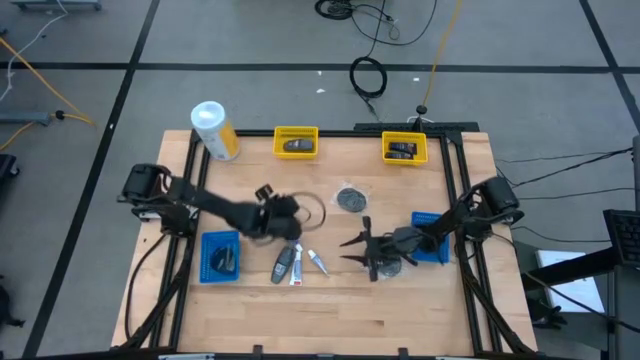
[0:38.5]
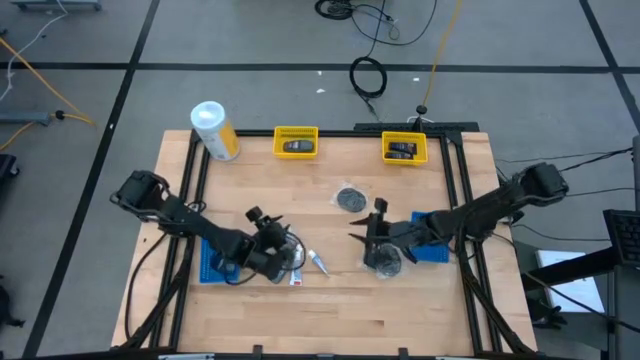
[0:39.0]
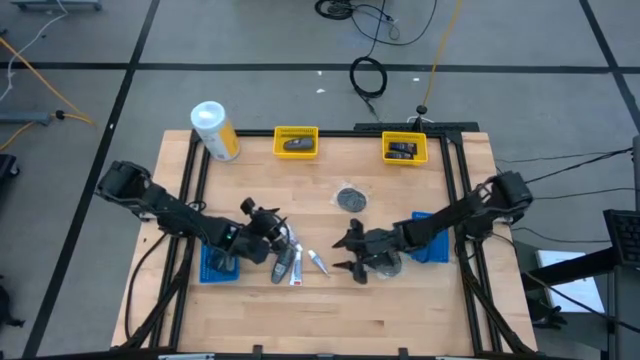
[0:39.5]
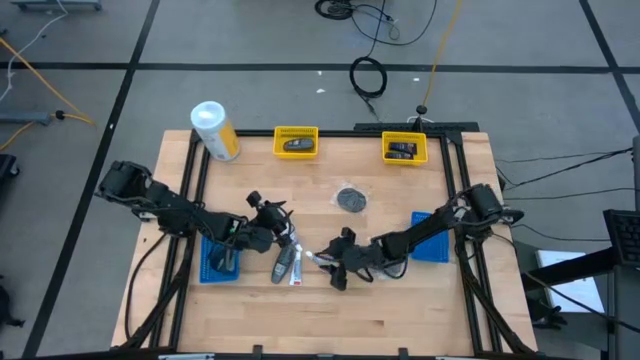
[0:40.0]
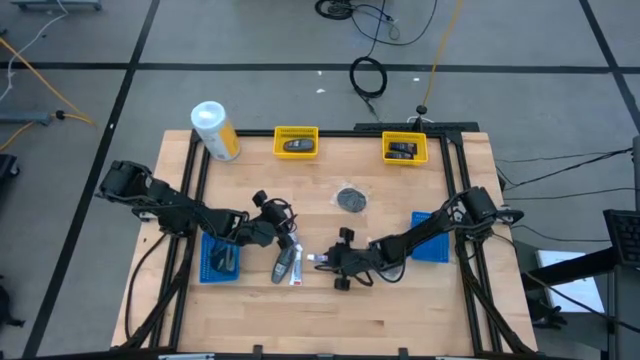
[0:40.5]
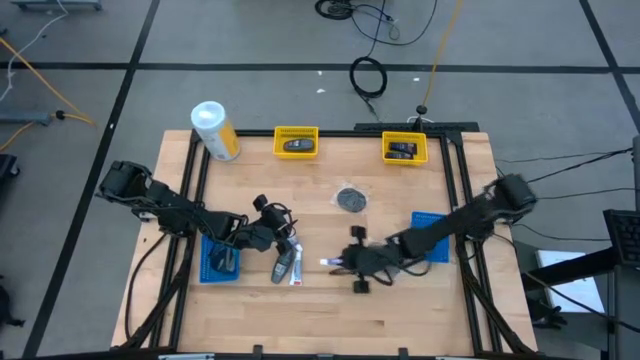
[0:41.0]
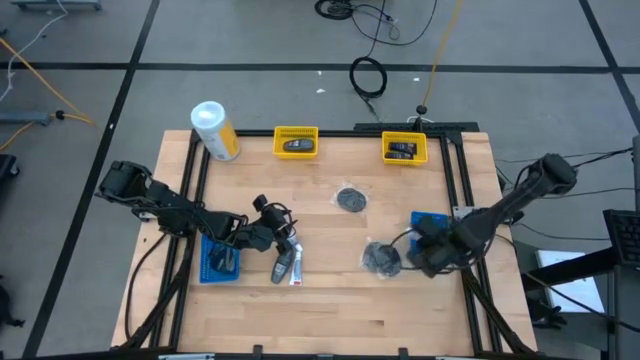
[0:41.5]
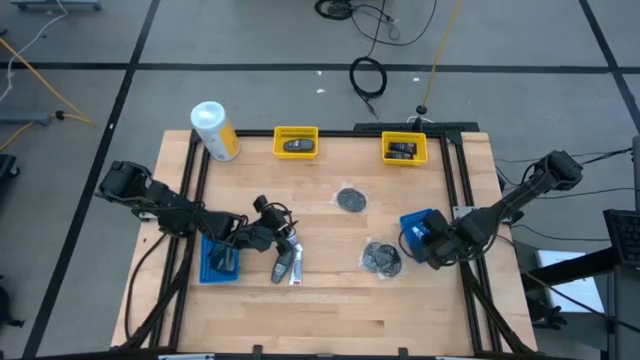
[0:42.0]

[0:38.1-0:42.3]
Task: Pick & Place Travel size toiletries
Put the white toothpaste into the right blue bin

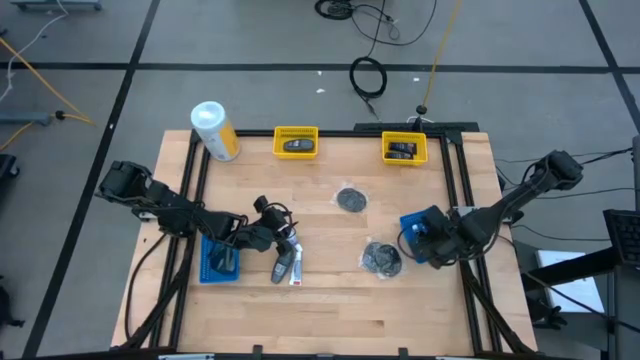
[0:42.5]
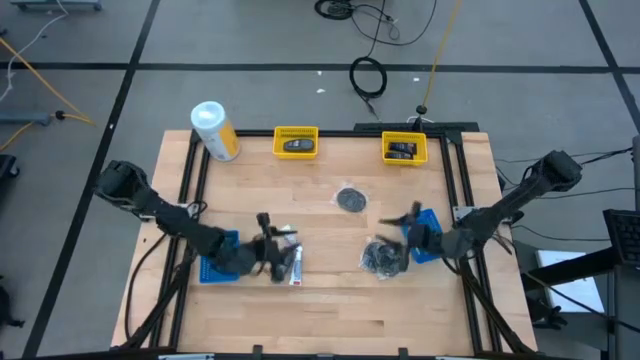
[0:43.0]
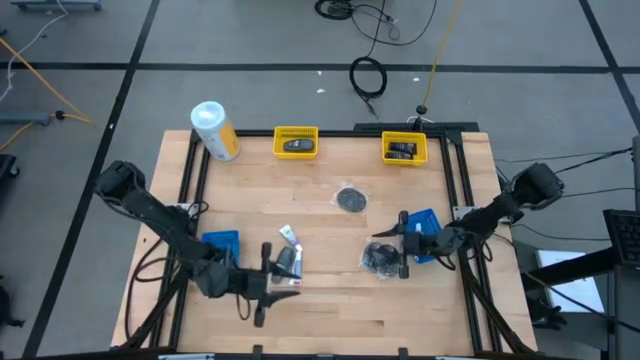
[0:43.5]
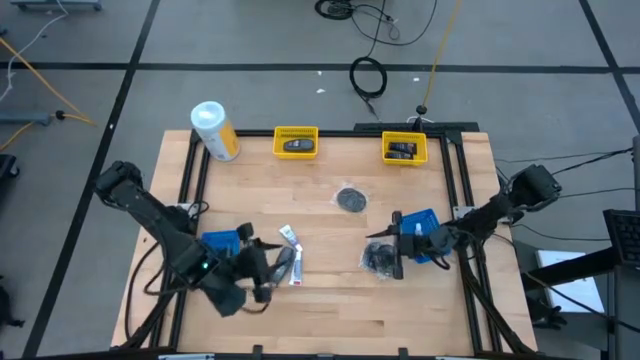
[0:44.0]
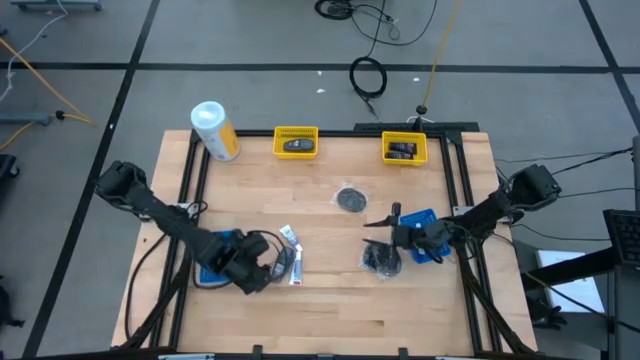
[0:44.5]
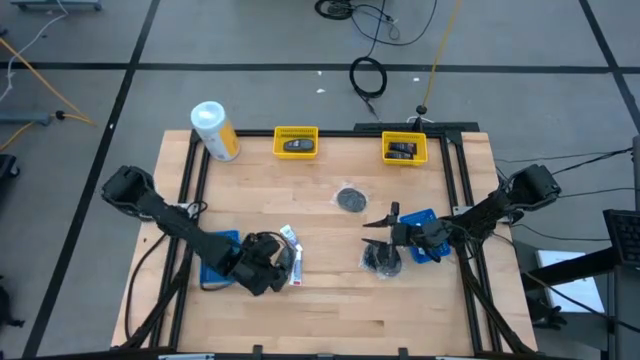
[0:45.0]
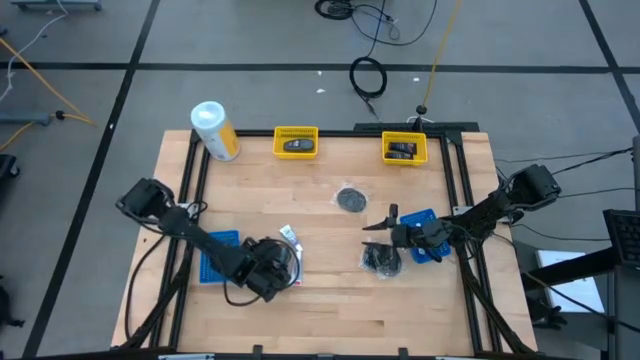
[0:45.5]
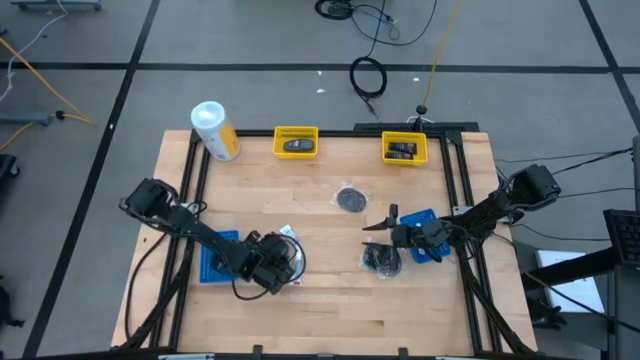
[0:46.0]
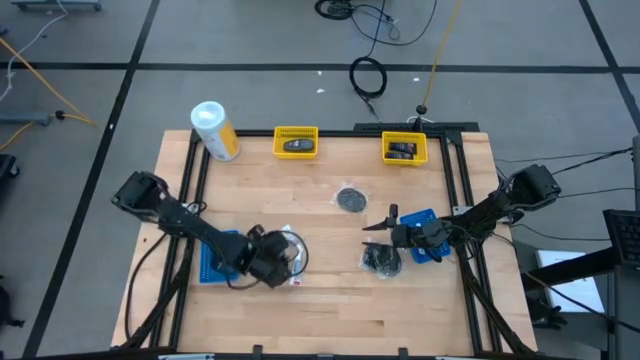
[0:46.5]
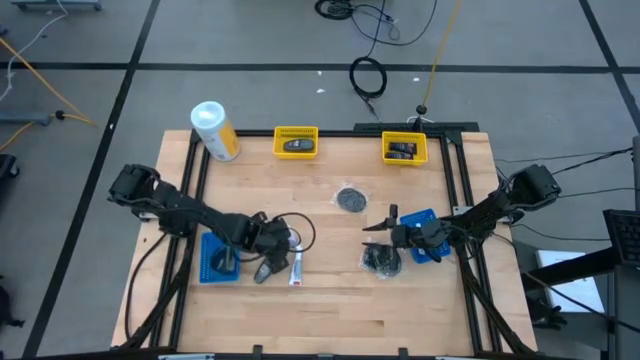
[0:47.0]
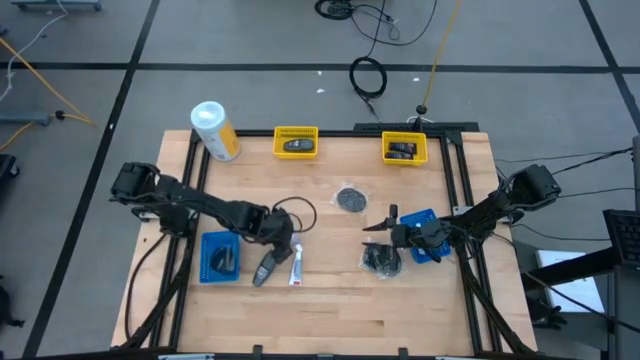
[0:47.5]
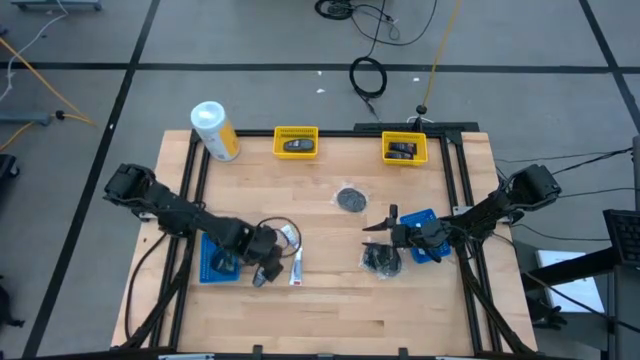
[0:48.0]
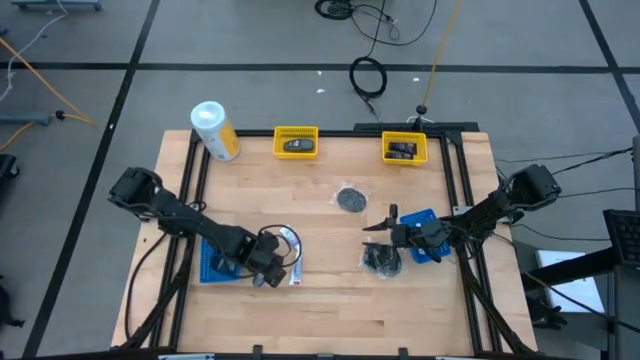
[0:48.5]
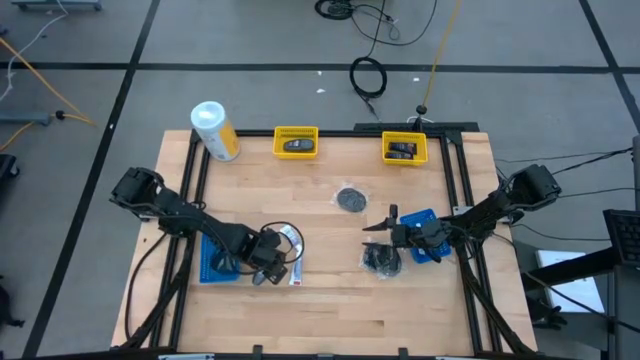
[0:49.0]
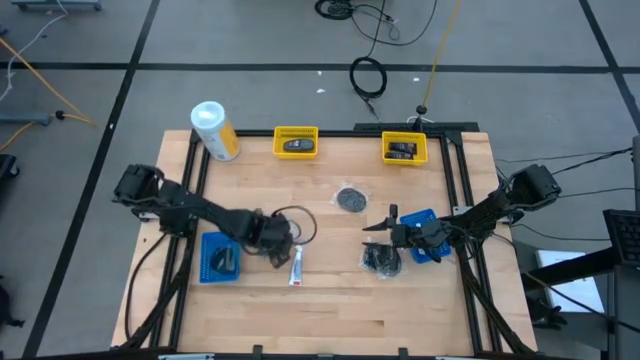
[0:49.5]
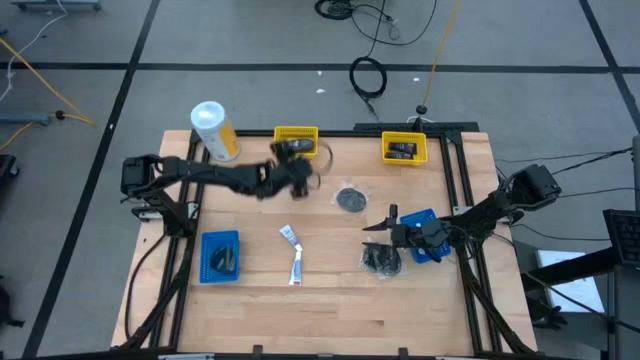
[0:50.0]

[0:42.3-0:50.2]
Put the gray deodorant into the left yellow bin

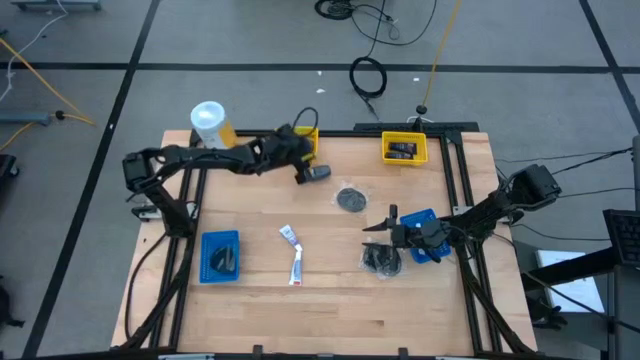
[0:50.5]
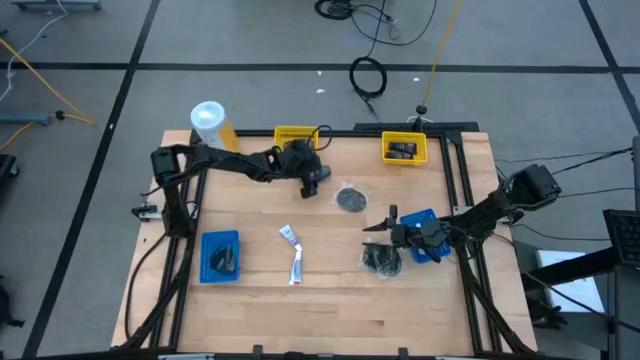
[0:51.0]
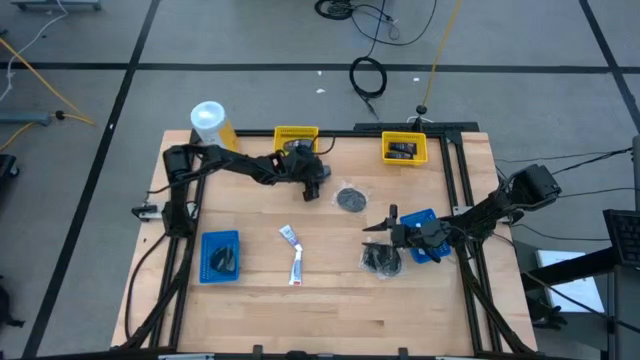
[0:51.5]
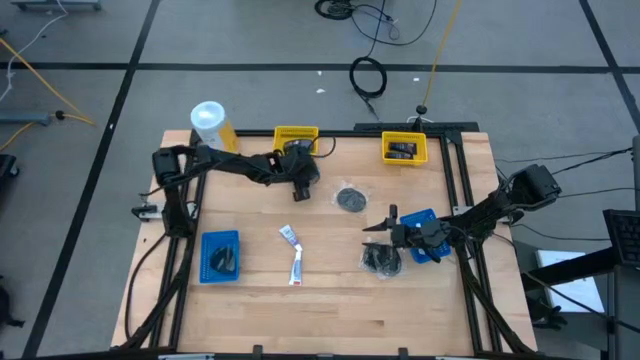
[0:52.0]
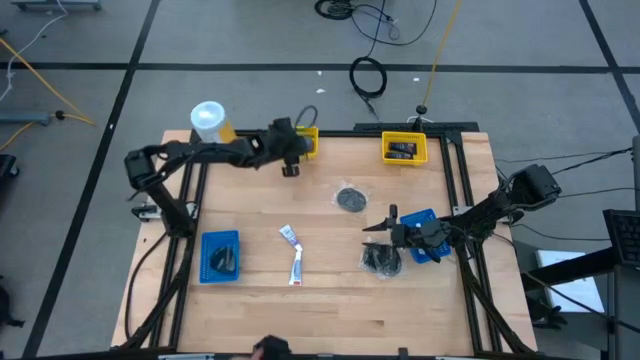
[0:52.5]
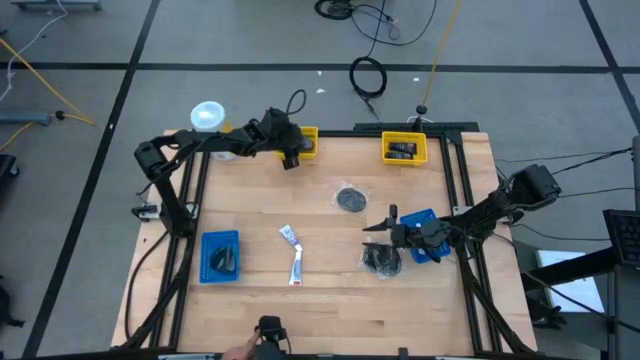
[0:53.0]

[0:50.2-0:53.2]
Put the gray deodorant into the left yellow bin

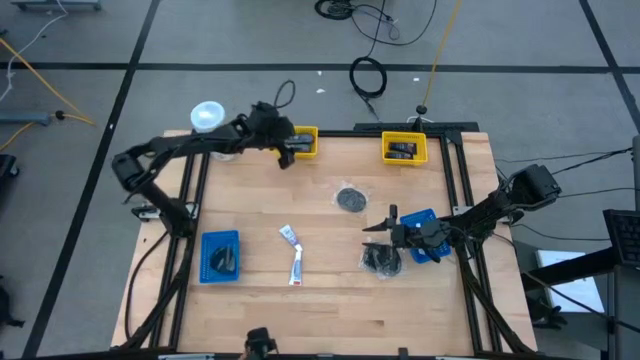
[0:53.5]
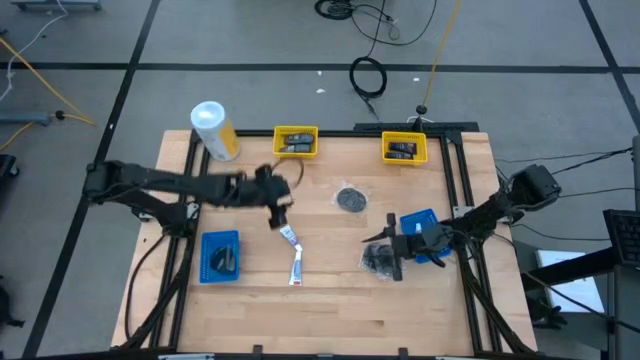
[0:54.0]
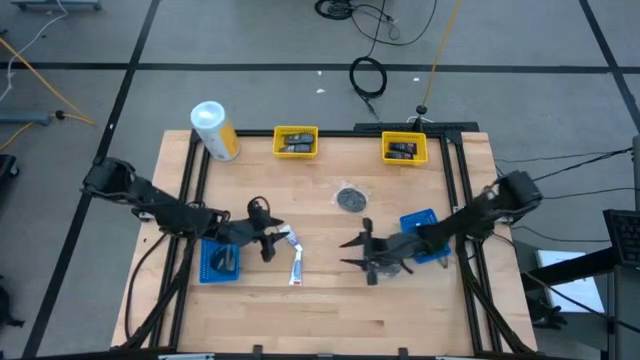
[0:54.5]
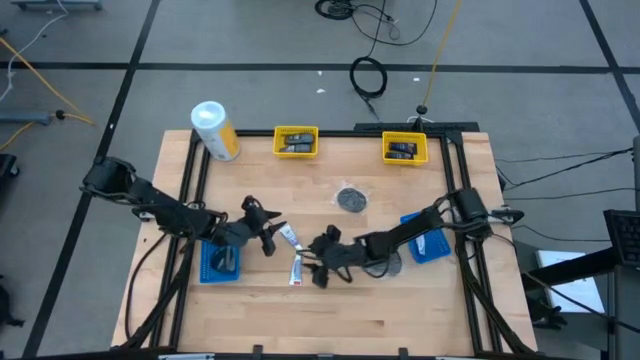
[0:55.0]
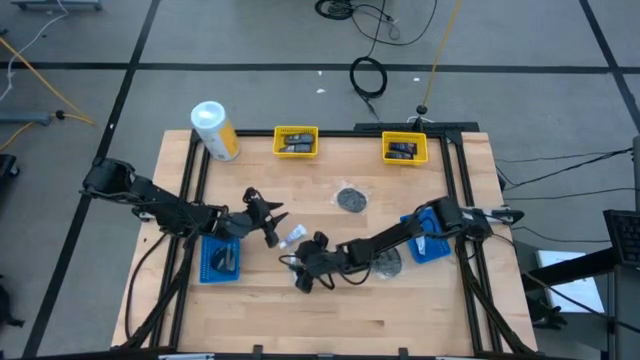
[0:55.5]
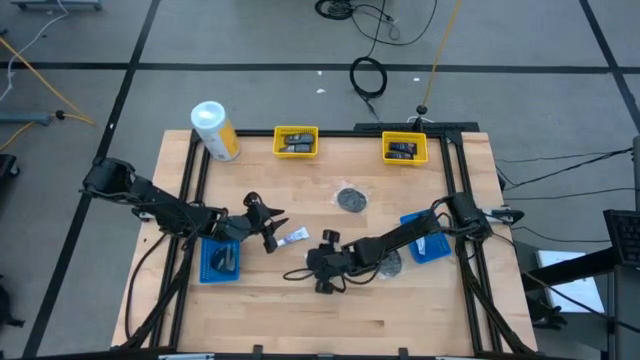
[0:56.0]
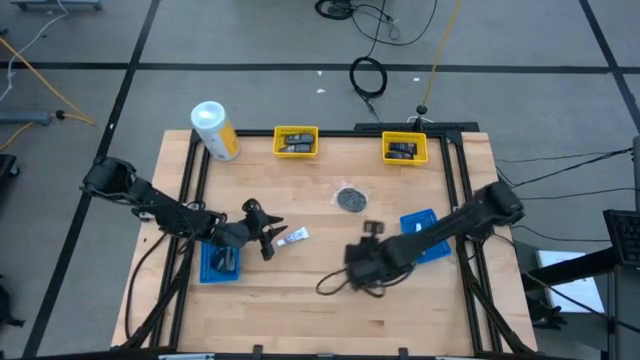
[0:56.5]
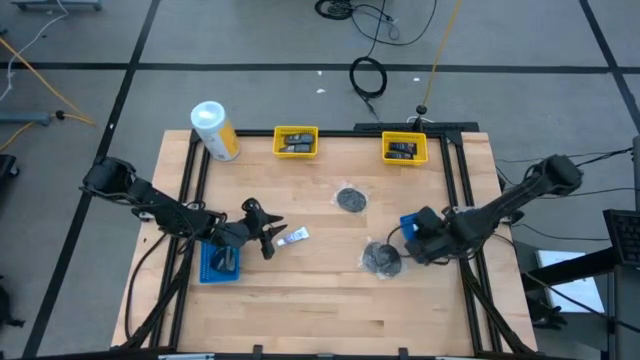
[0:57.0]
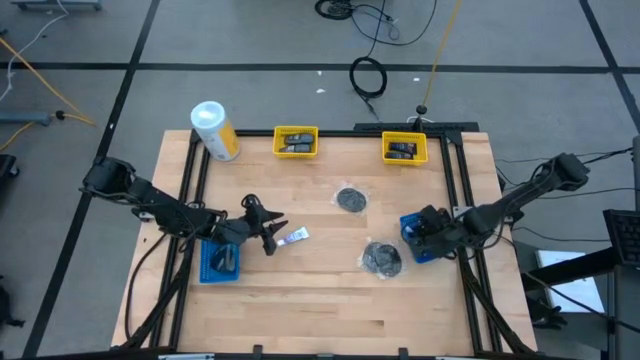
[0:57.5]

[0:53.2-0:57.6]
Put the white toothpaste into the right blue bin

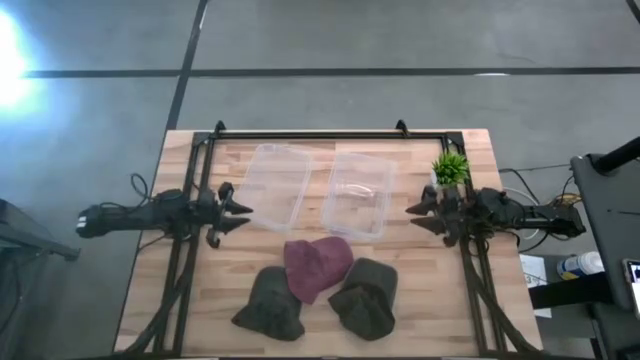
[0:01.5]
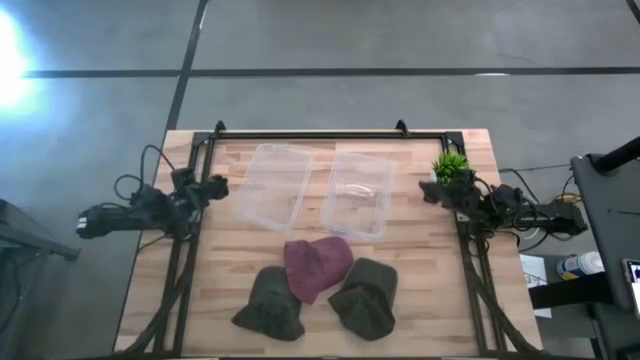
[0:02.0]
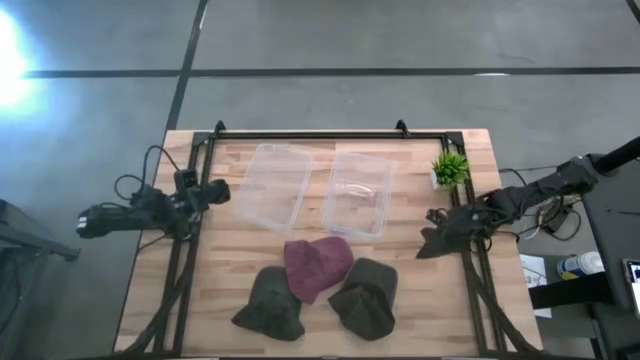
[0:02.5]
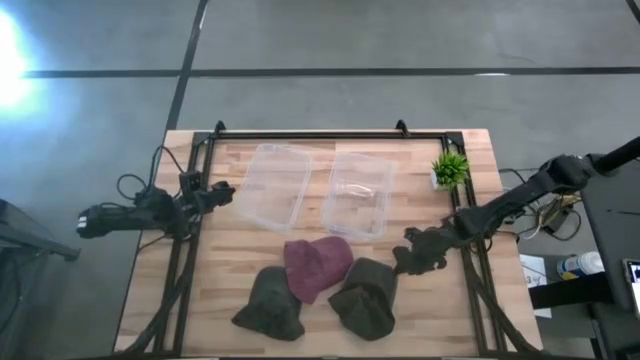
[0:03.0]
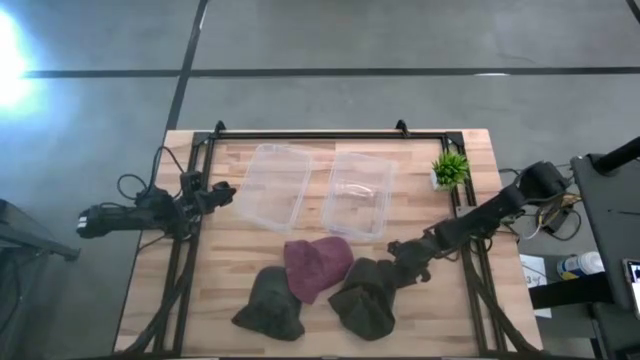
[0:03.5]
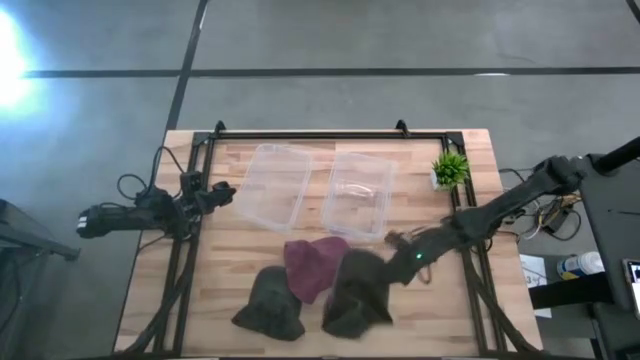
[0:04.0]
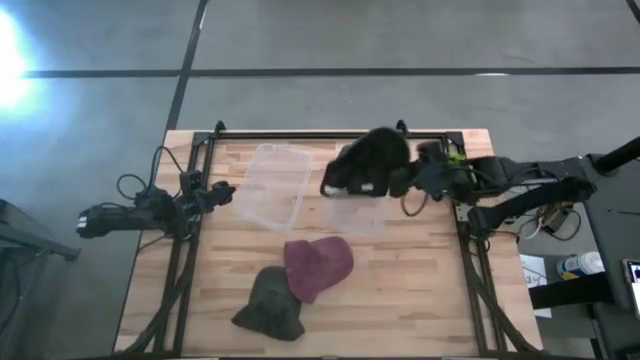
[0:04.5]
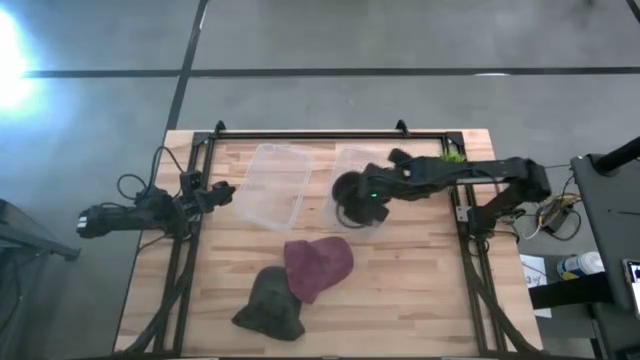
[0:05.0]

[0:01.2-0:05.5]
Task: Pick & Place hat
Put the right black cap into the right transparent bin
